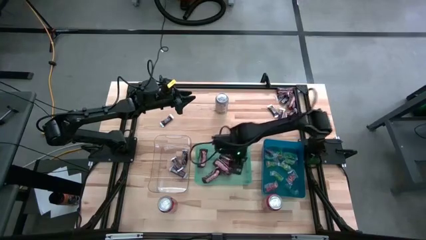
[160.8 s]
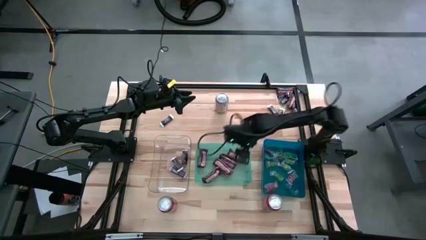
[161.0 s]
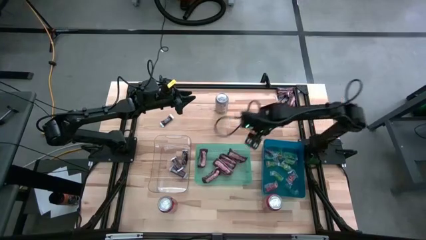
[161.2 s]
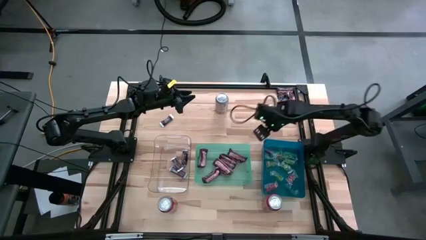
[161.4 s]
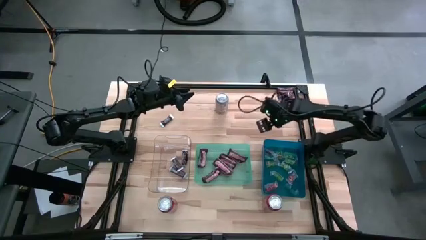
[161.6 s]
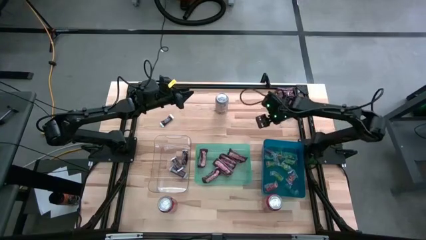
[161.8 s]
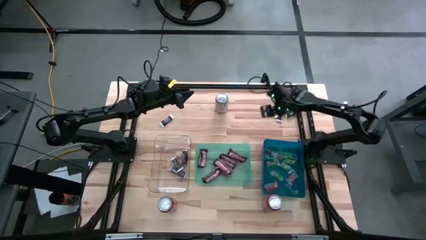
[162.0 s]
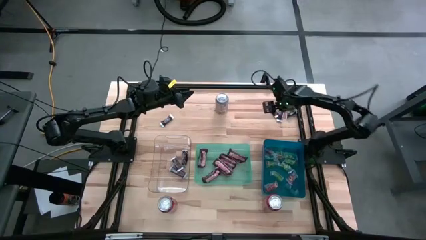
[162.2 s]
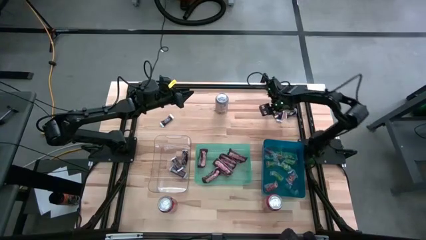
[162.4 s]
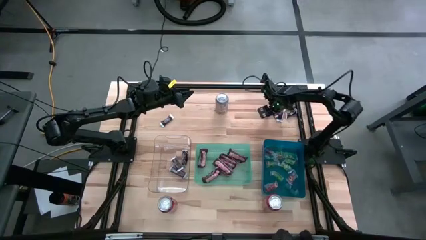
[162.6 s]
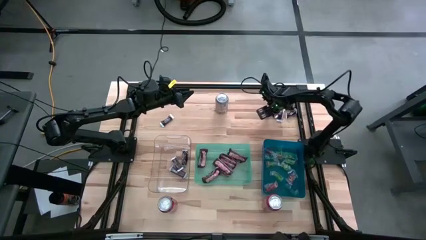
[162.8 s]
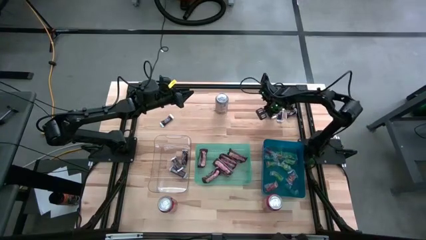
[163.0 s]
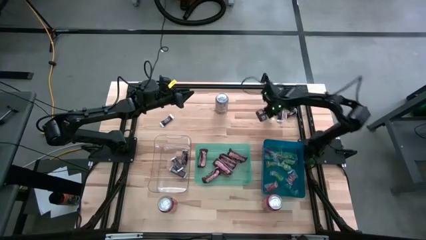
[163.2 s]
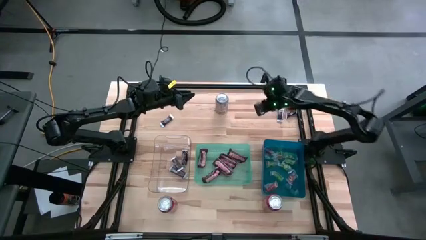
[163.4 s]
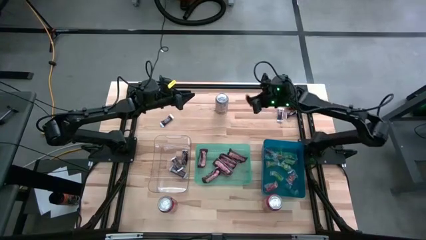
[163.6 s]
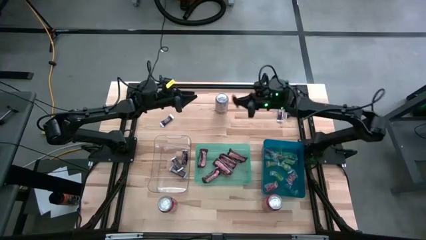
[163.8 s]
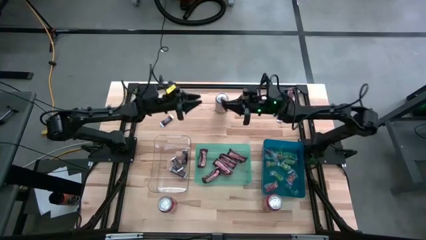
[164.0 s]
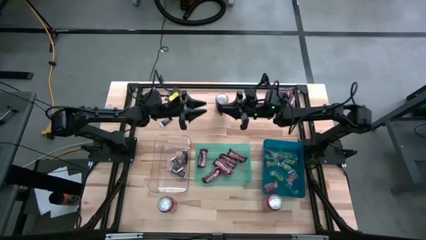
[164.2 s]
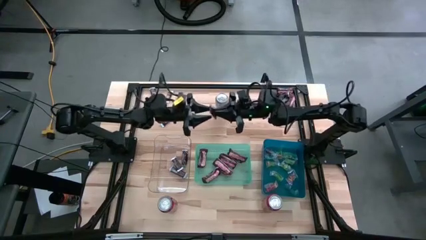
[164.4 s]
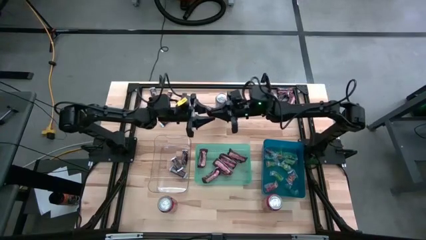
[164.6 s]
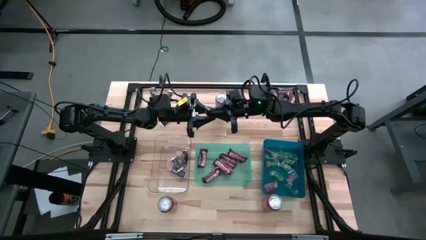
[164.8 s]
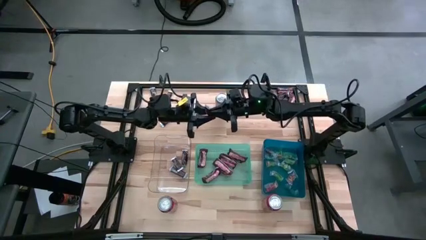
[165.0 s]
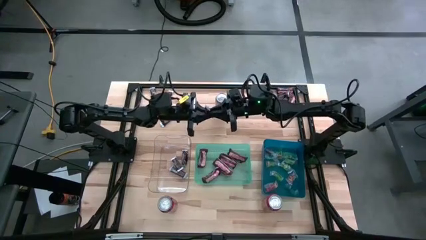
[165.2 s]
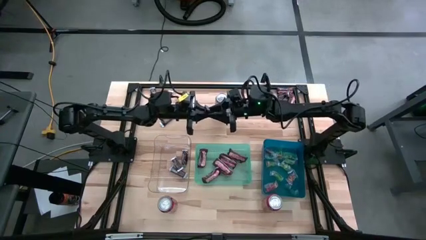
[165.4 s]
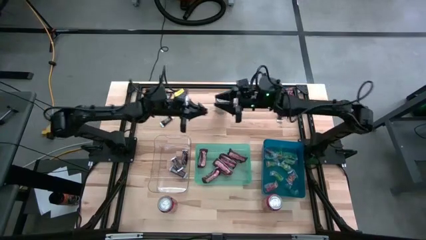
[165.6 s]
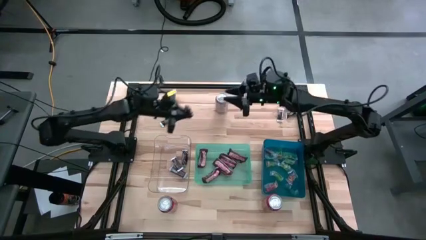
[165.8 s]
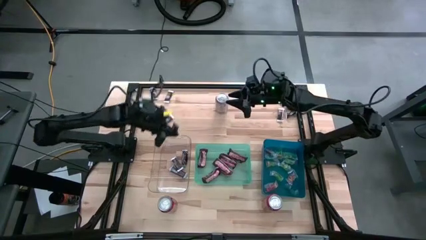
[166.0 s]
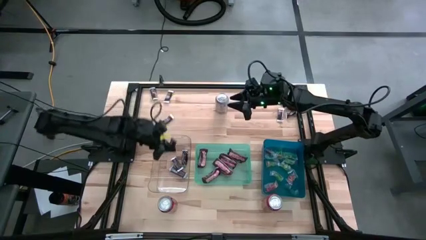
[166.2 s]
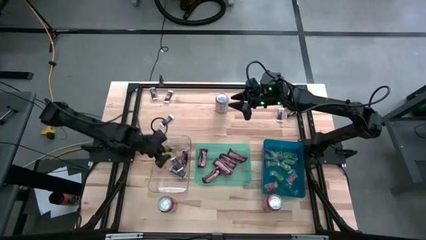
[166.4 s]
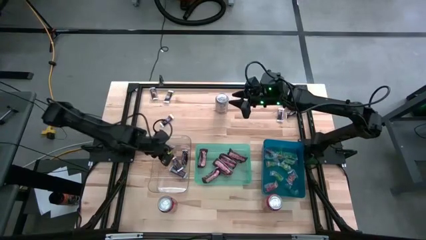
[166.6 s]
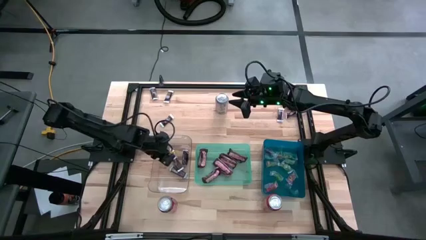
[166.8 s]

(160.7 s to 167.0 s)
Task: Organize candy in baskets
Put the brown white chocolate bar into the transparent bin

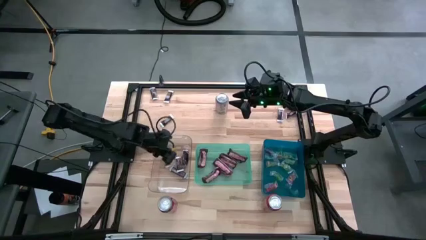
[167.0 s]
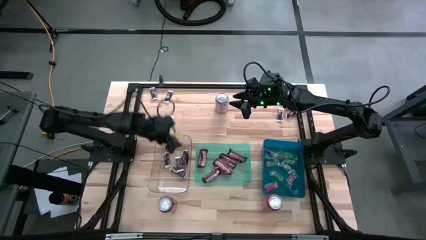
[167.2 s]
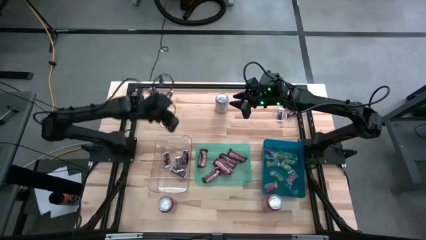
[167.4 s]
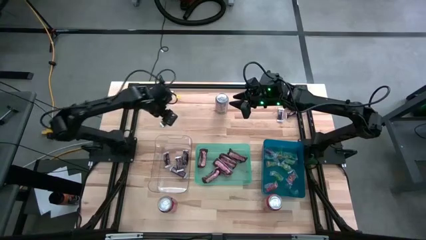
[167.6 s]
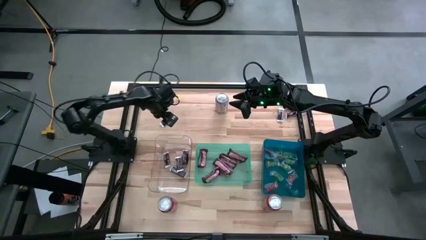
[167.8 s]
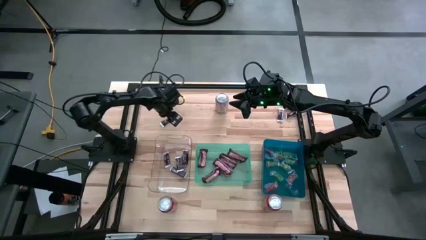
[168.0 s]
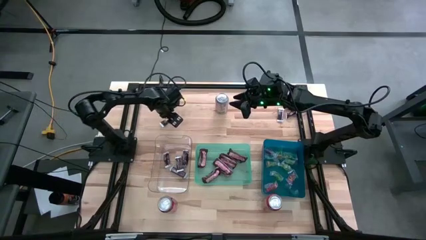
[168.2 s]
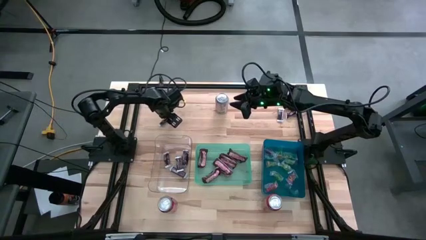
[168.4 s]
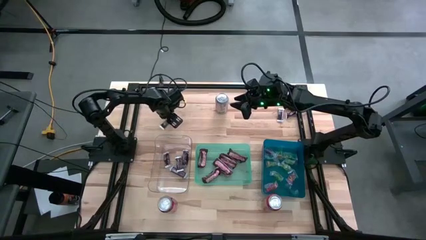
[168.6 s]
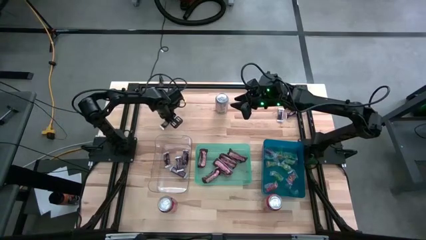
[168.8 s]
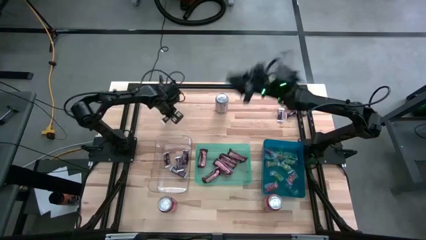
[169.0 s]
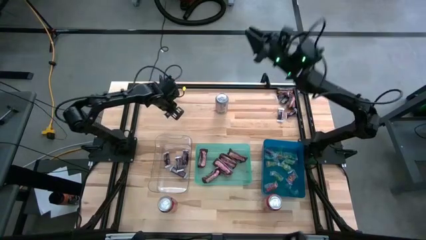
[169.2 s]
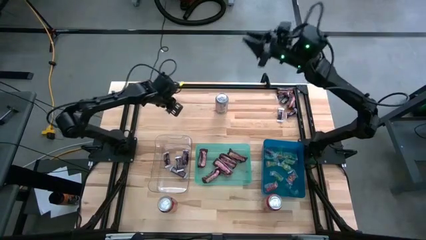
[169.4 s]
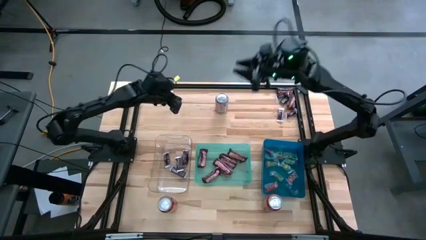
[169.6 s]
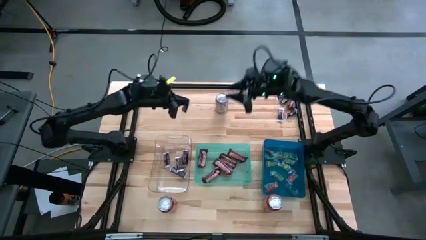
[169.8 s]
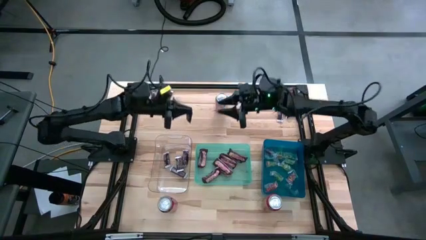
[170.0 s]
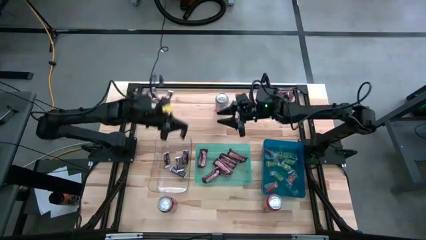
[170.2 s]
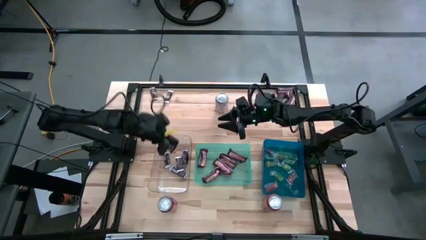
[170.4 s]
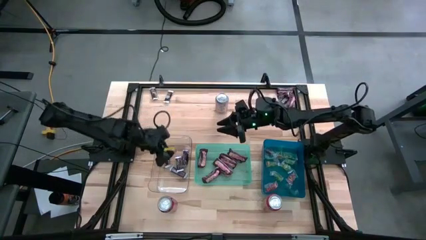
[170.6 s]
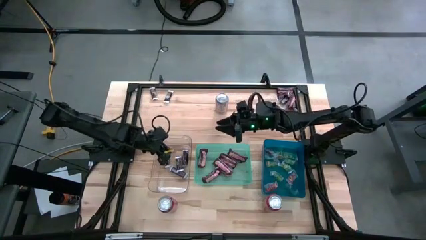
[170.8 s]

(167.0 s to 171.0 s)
Put the brown white chocolate bar into the transparent bin

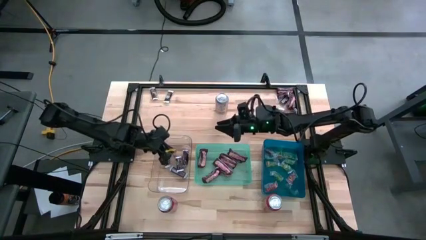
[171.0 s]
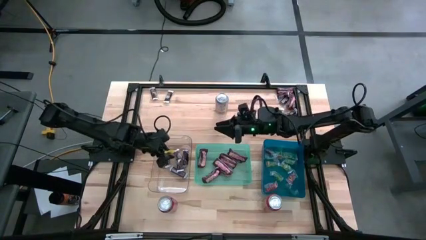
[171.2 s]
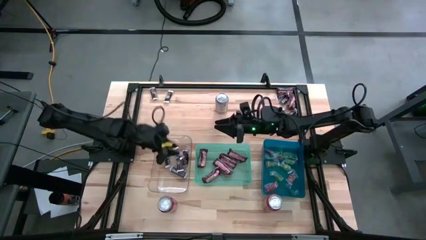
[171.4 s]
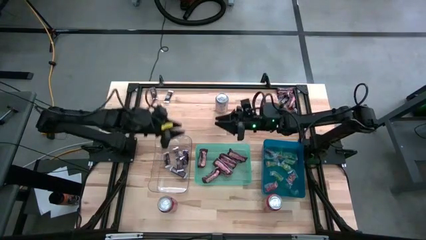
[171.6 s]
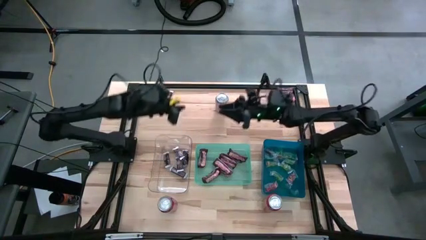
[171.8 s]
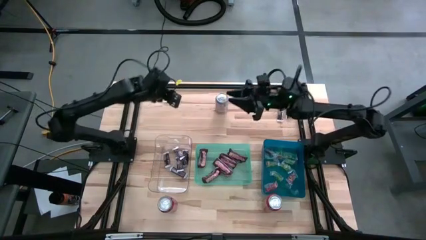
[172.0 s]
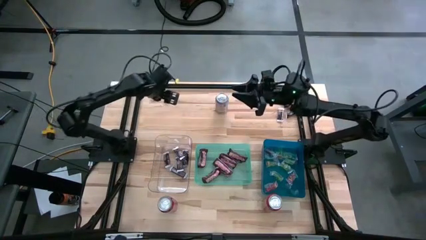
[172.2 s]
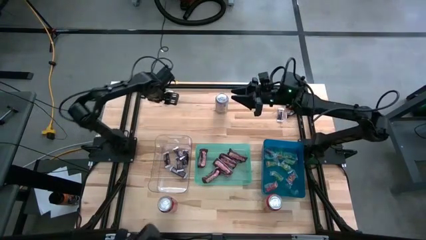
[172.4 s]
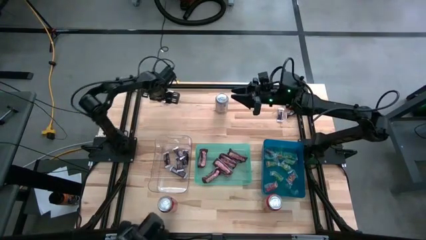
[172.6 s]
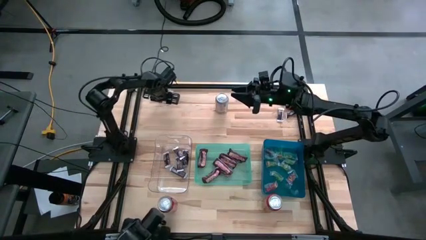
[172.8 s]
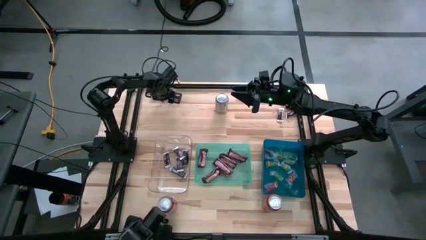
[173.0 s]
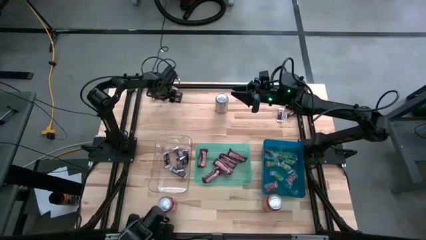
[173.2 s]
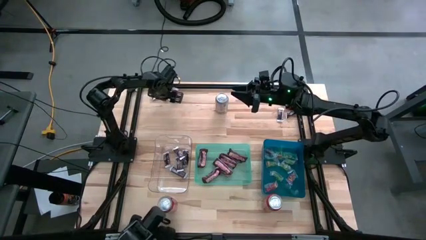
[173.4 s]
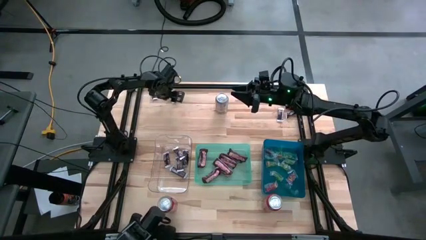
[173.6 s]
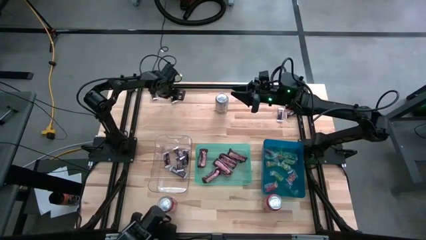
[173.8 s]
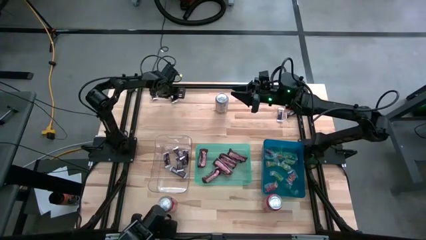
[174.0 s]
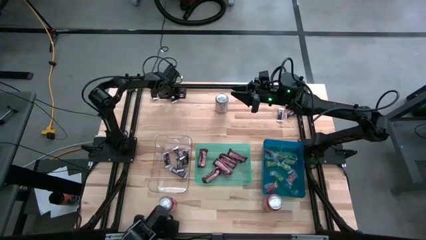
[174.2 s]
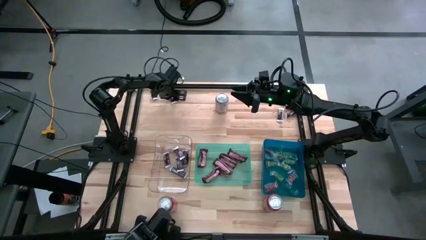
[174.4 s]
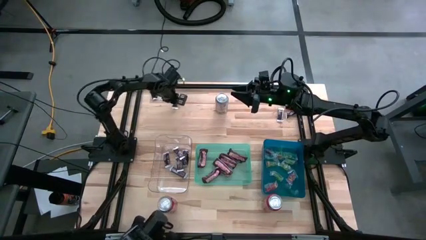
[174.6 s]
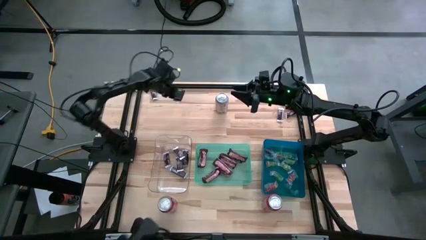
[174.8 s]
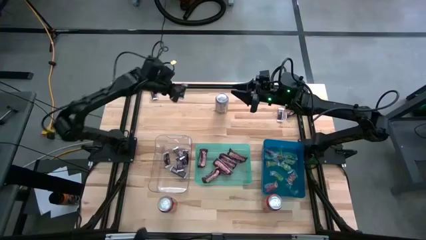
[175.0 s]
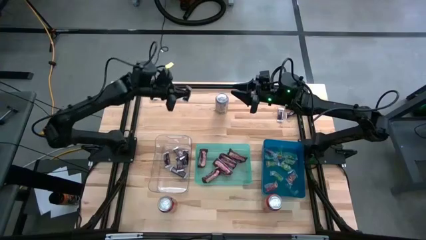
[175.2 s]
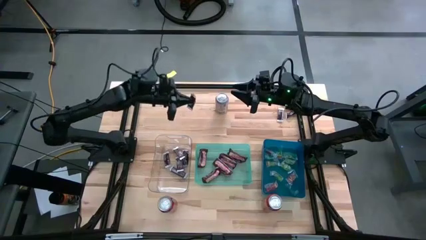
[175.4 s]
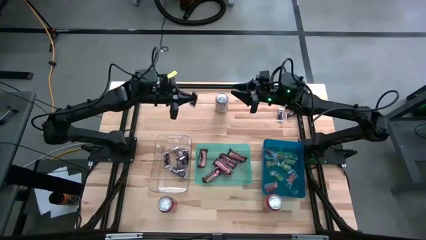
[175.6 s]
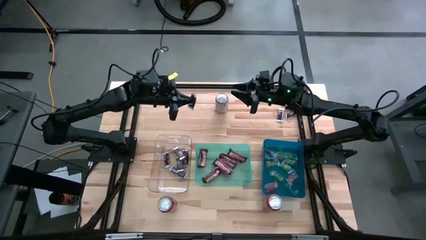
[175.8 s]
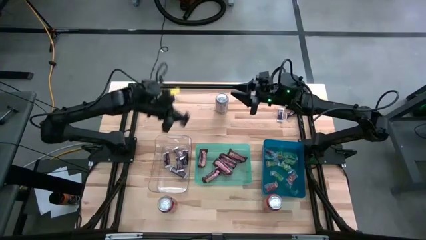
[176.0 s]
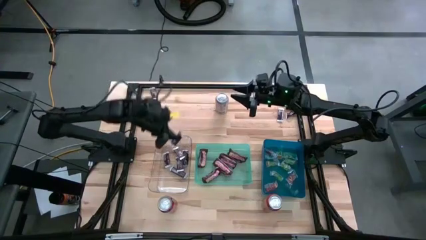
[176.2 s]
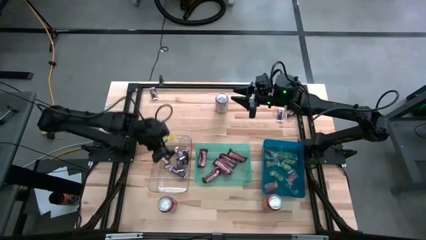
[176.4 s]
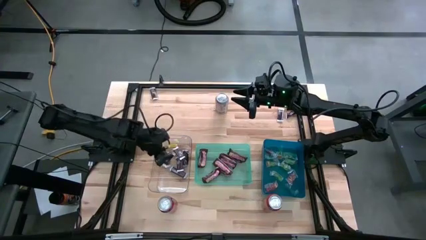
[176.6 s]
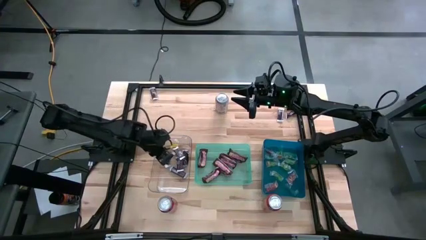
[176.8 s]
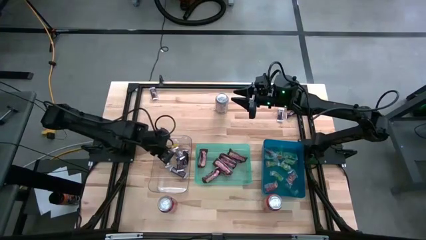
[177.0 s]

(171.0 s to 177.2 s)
Put the brown white chocolate bar into the transparent bin
